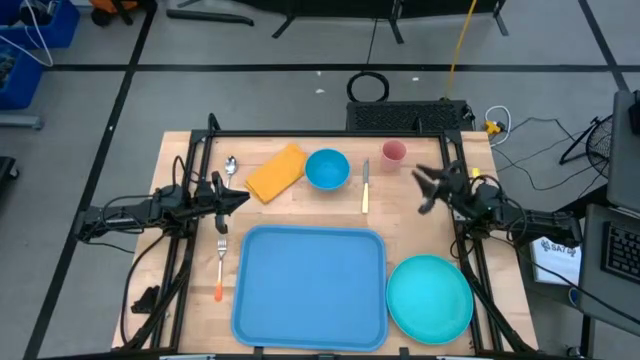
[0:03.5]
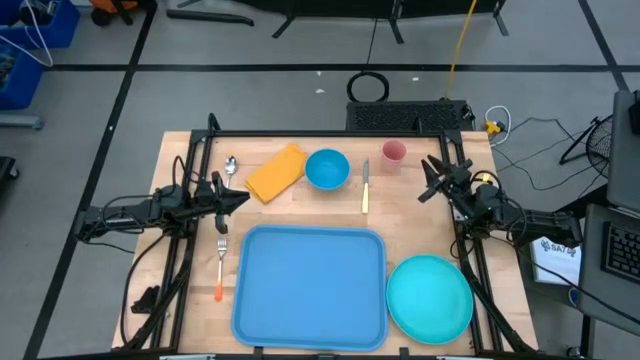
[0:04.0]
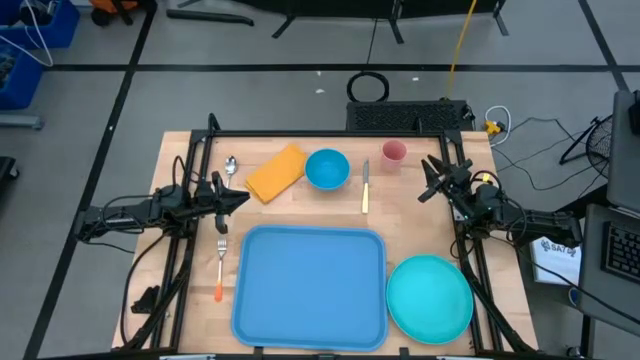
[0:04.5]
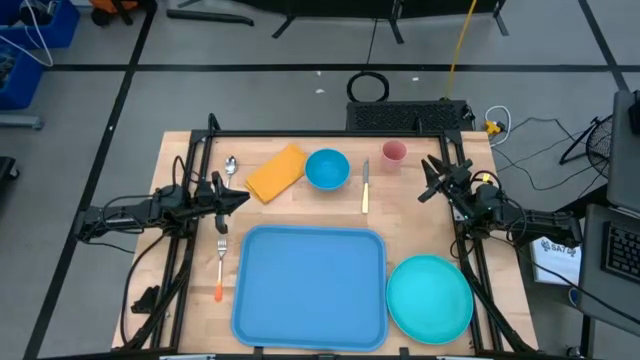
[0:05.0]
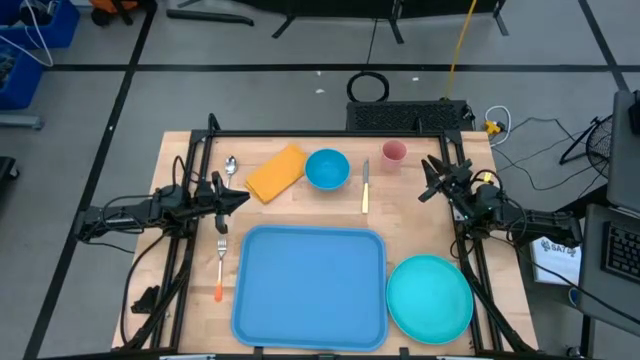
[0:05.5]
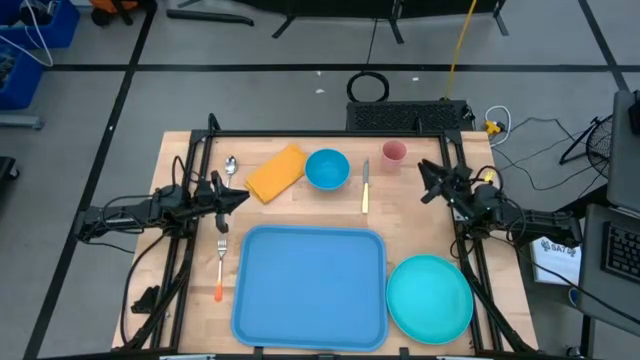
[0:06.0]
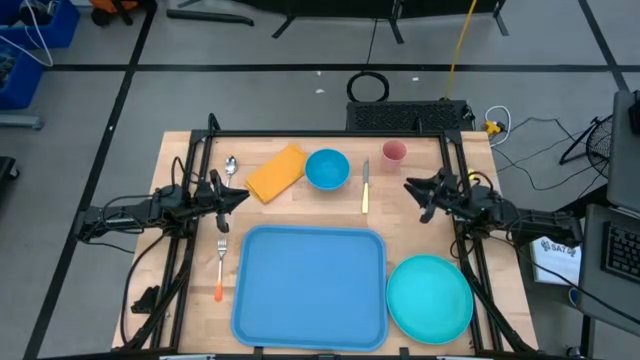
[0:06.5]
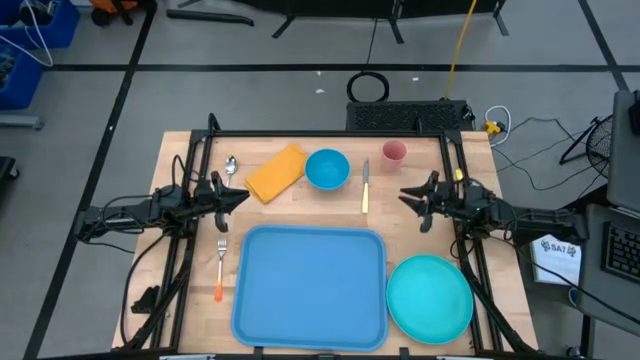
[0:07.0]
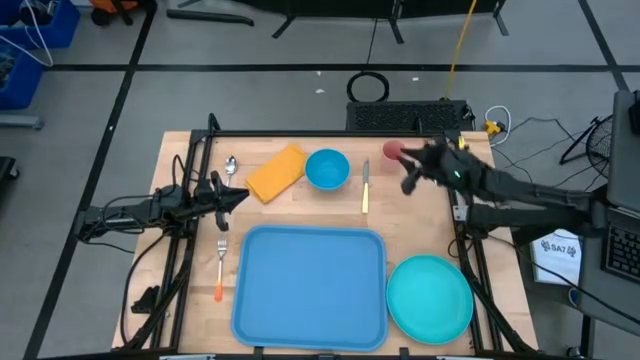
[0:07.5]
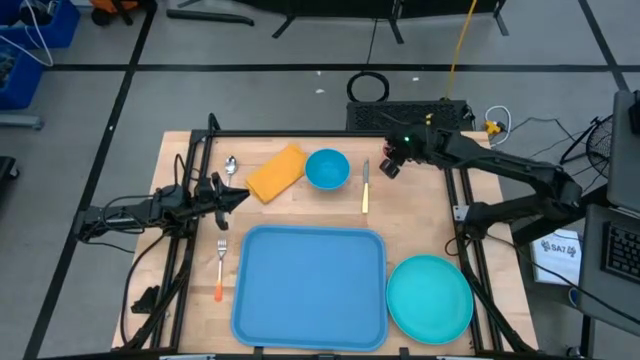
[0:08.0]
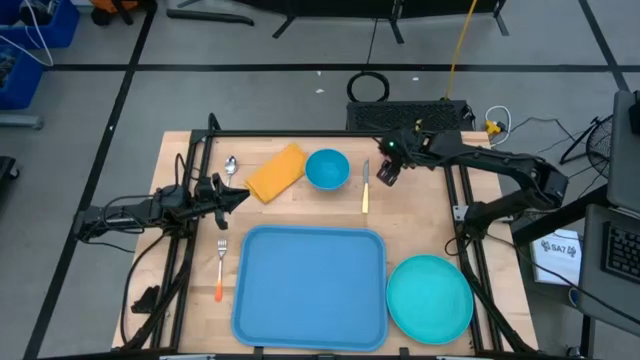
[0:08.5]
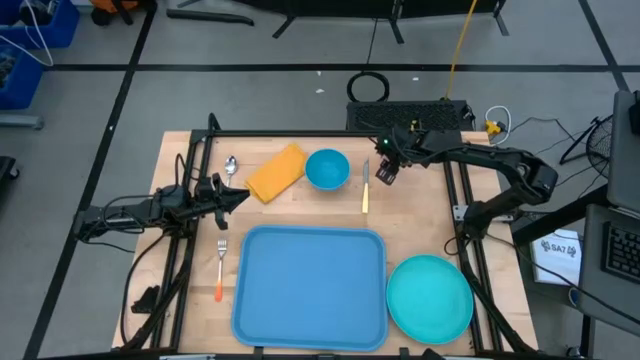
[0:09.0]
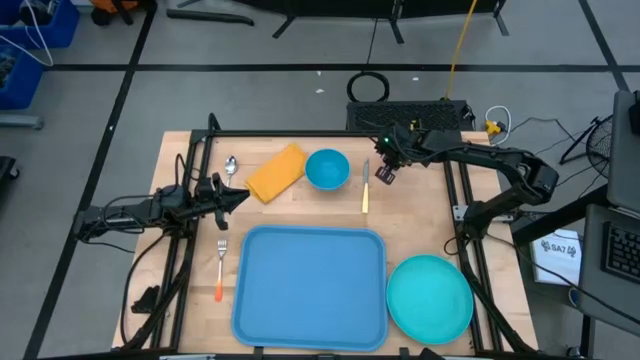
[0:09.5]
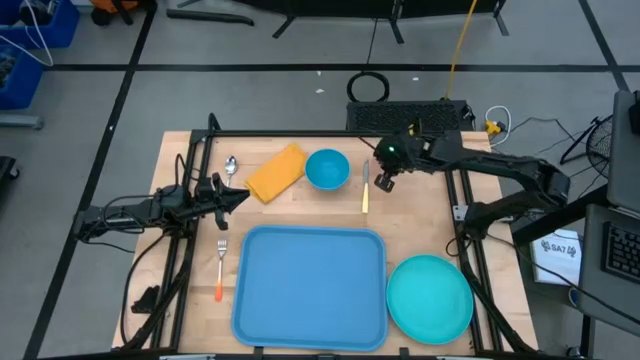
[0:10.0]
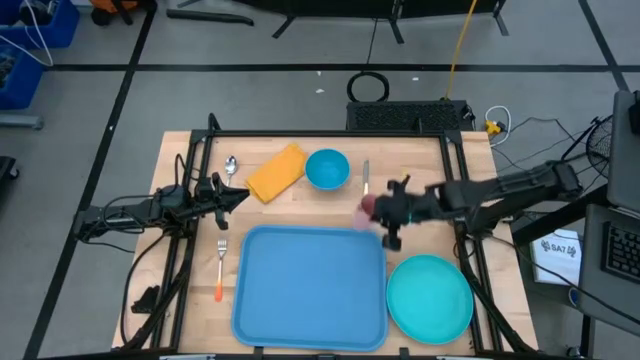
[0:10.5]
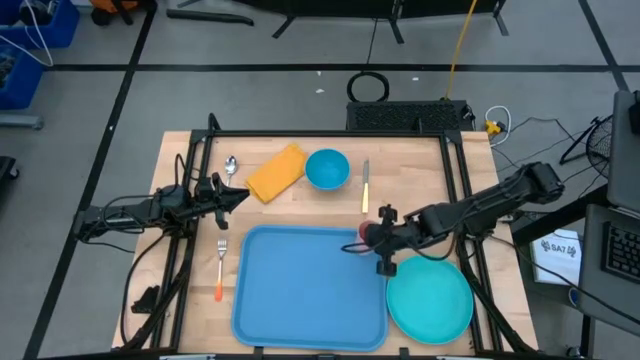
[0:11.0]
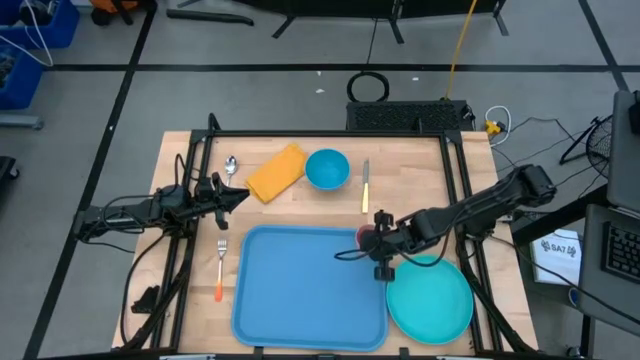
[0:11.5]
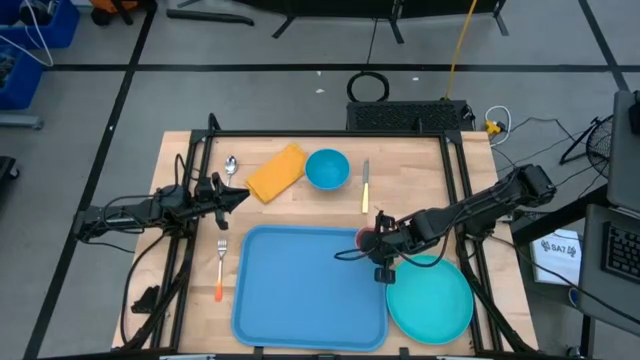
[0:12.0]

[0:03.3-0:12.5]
Task: Set up tray
Put the pink cup on the blue tray

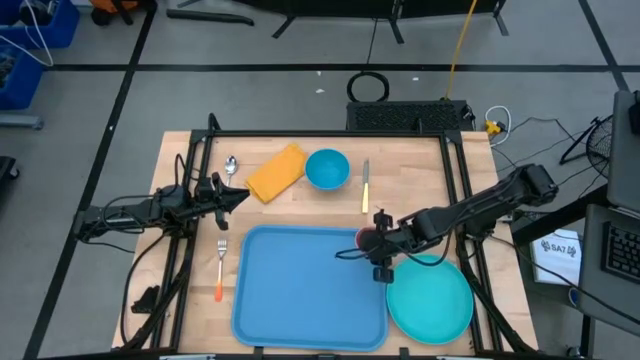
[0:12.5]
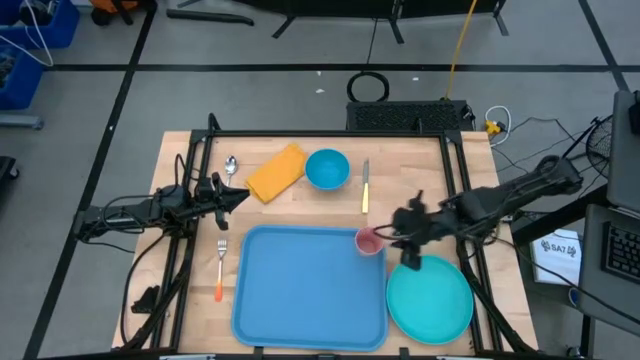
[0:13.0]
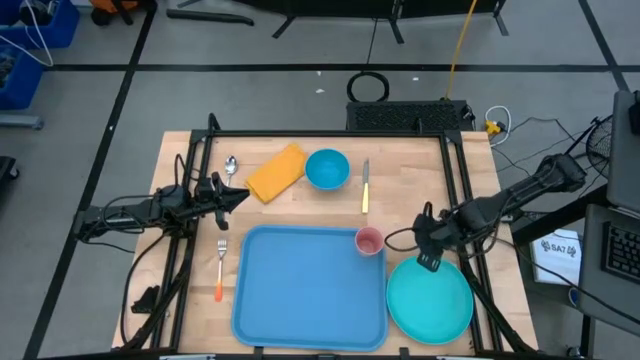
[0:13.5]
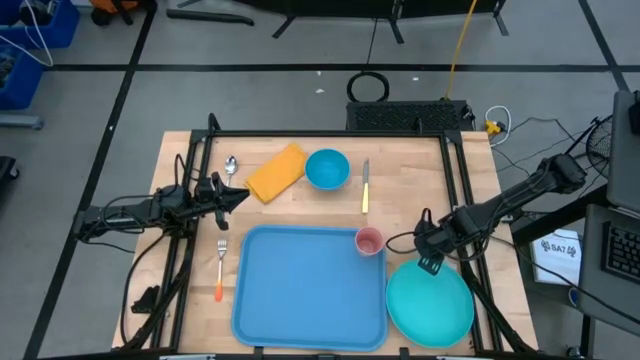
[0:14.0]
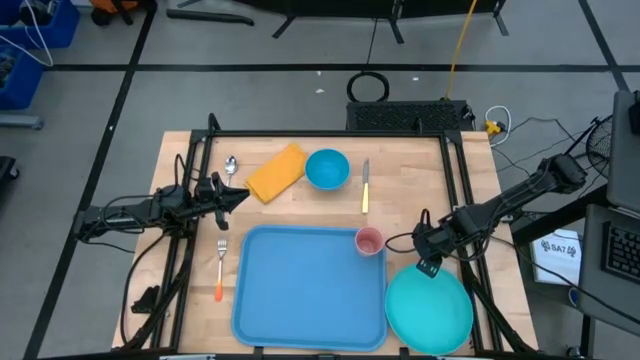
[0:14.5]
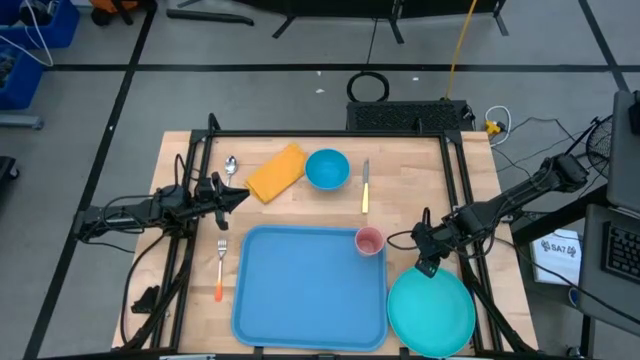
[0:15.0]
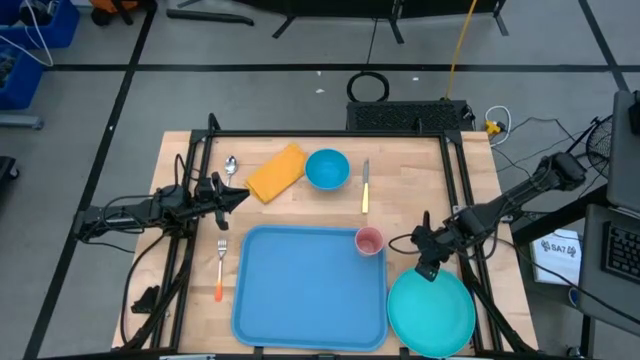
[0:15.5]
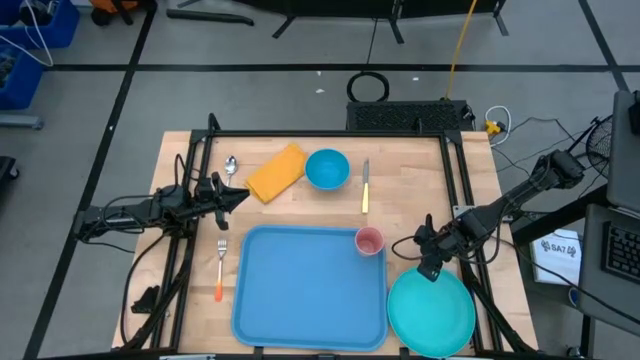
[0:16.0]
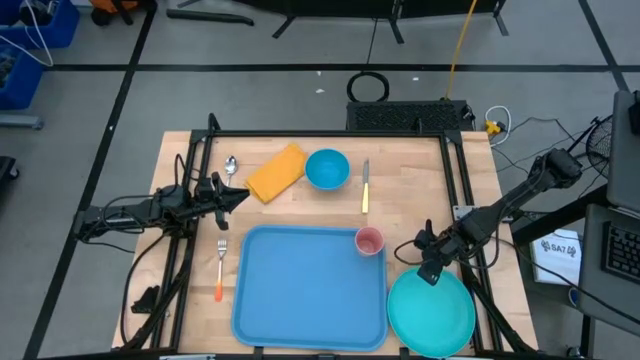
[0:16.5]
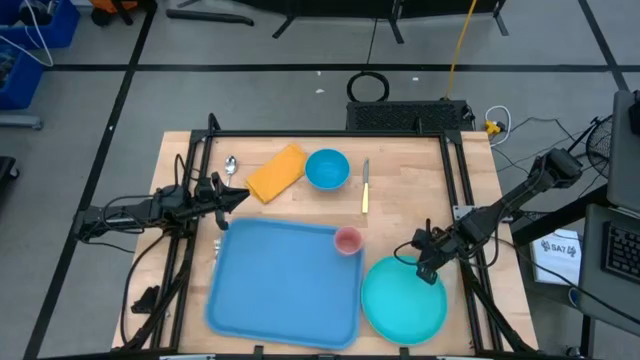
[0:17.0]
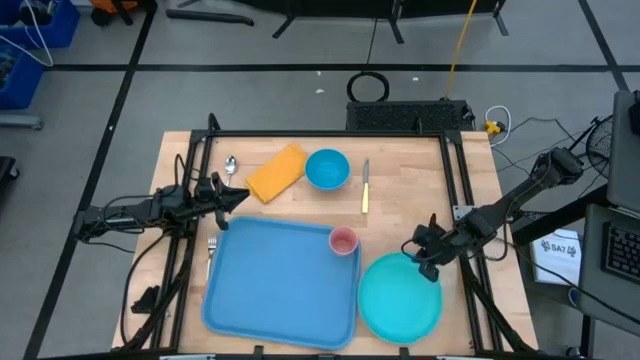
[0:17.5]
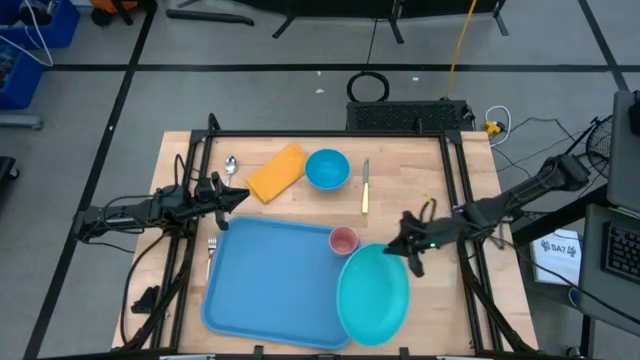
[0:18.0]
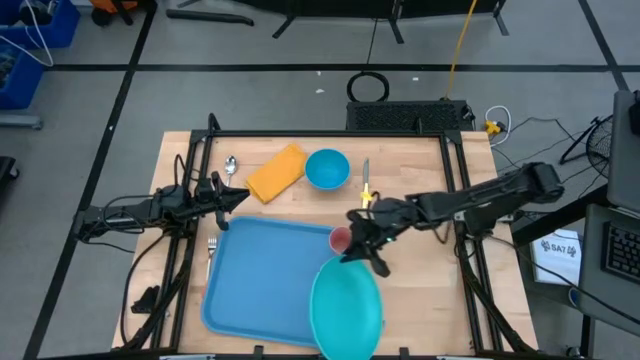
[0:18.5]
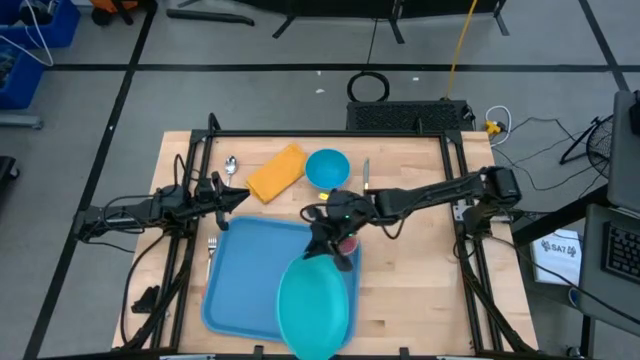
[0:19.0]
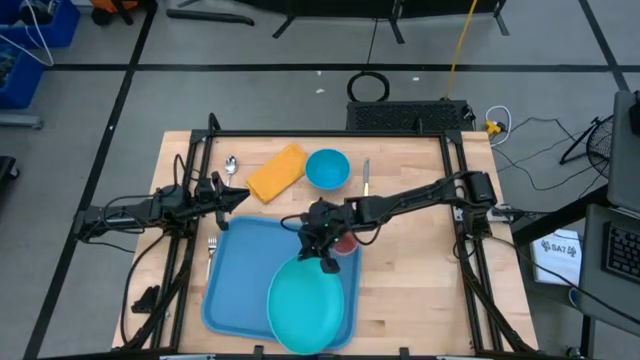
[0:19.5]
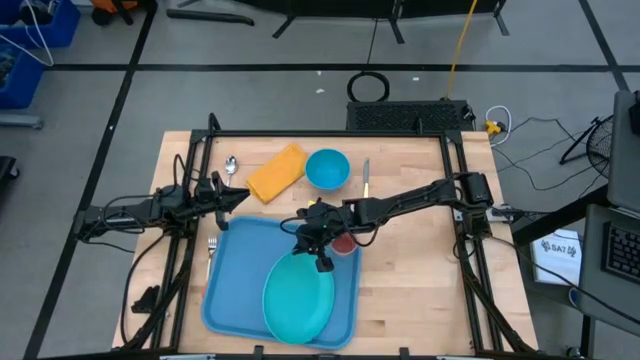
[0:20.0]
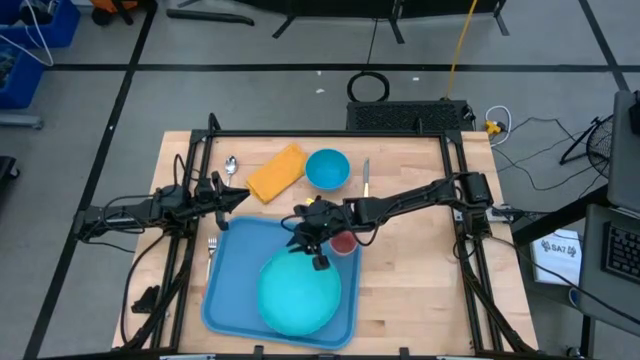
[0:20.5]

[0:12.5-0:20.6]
Put the light blue plate on the blue tray

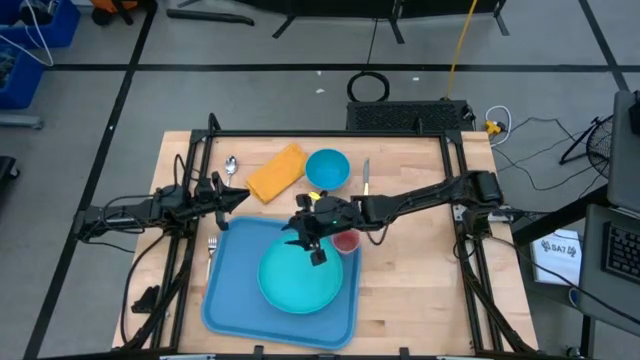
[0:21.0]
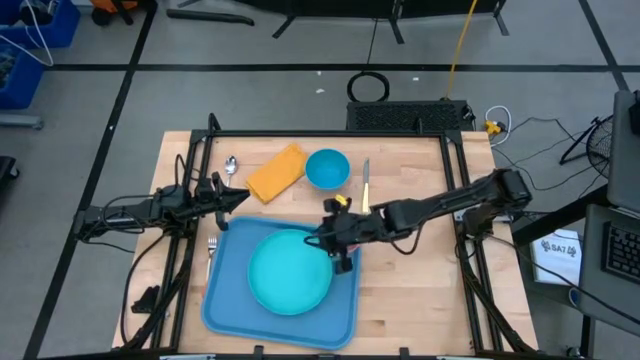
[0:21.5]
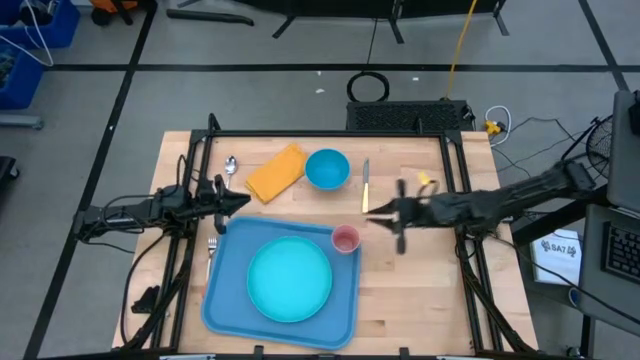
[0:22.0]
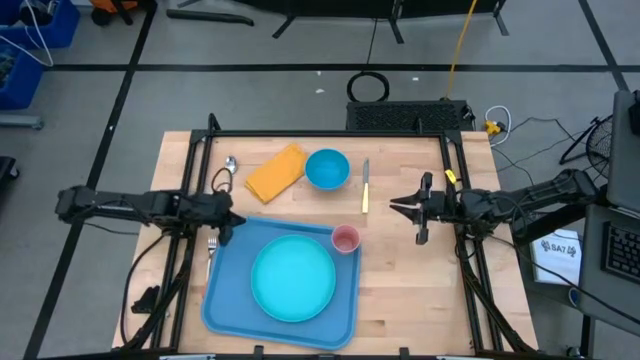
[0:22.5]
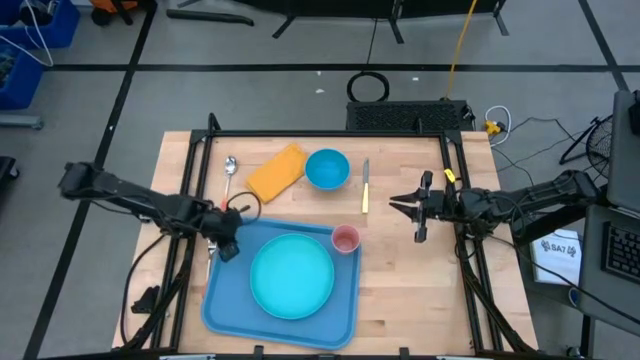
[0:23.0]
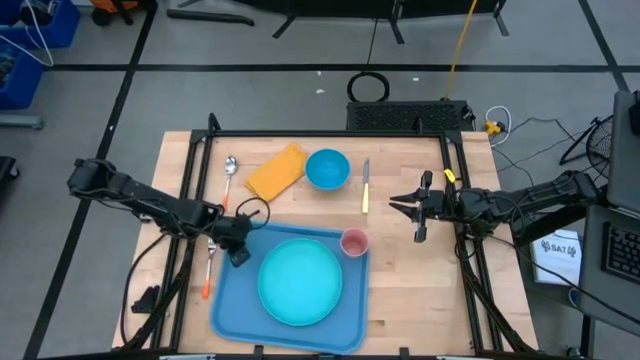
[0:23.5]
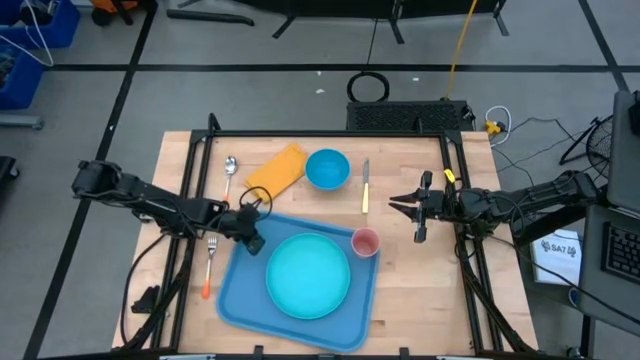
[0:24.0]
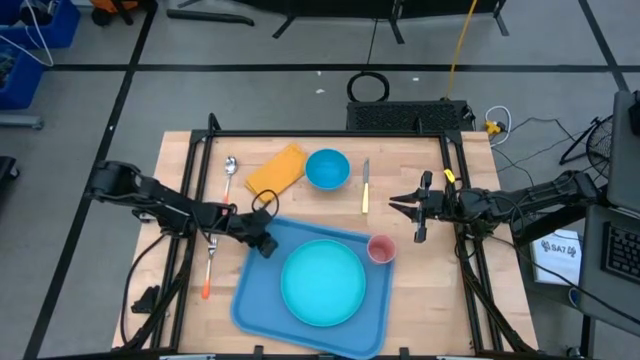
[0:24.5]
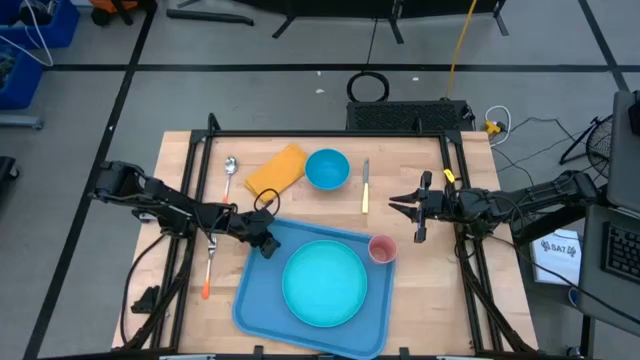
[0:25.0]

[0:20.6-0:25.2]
Adjust the blue tray
